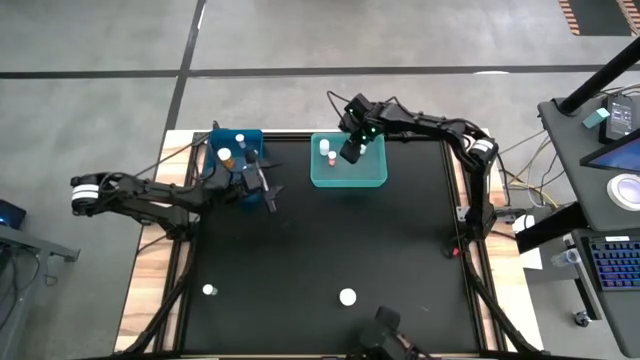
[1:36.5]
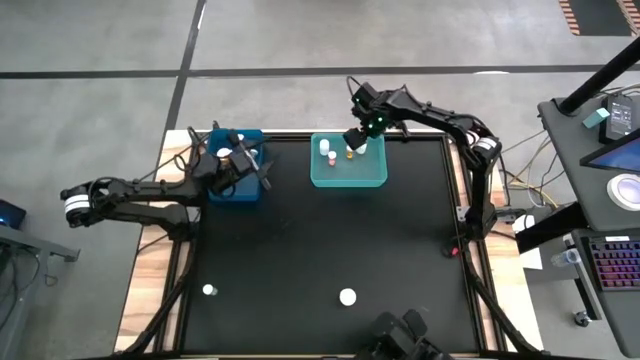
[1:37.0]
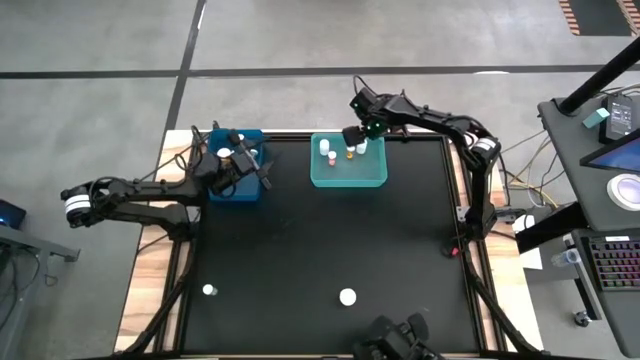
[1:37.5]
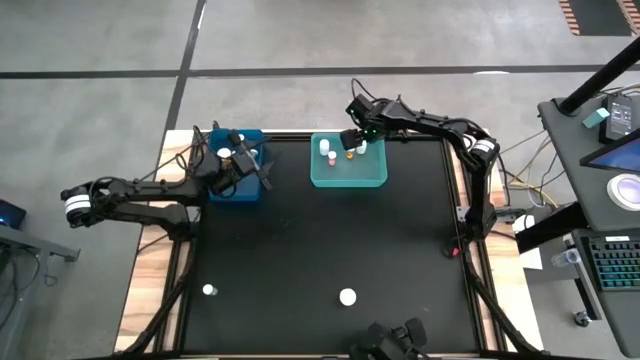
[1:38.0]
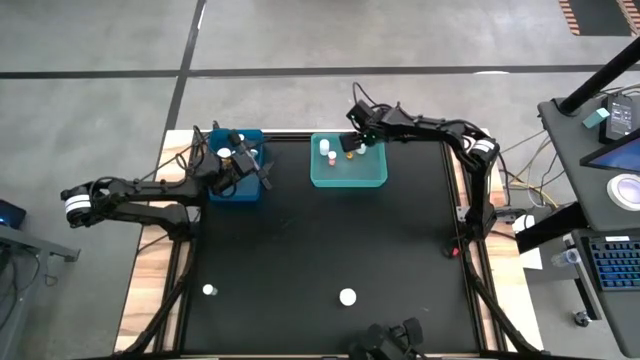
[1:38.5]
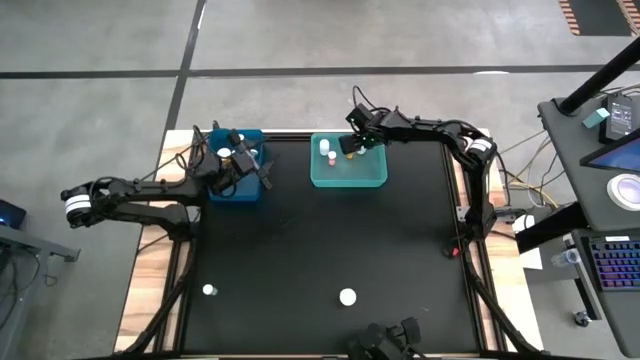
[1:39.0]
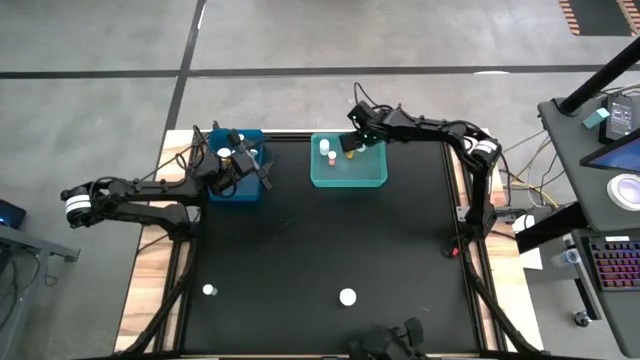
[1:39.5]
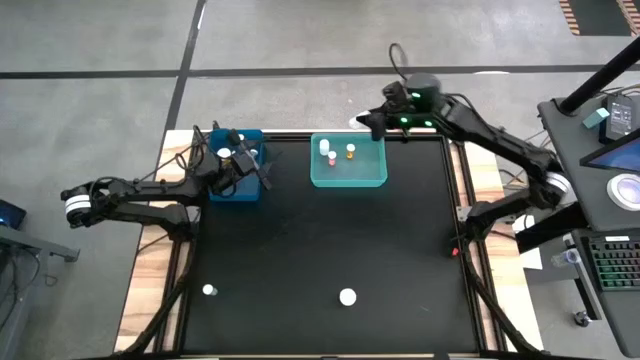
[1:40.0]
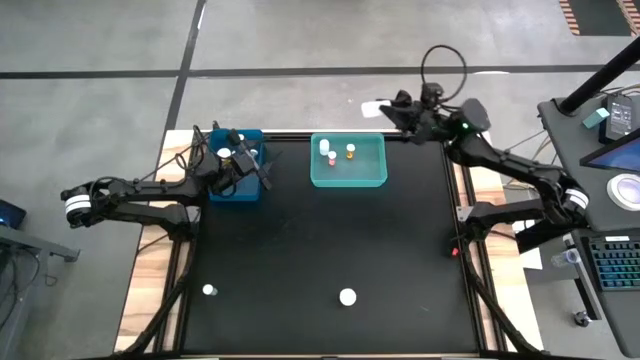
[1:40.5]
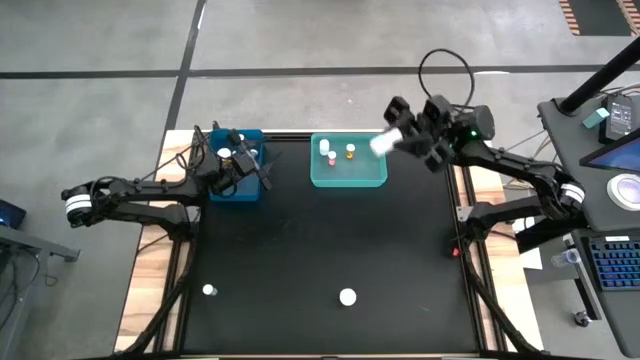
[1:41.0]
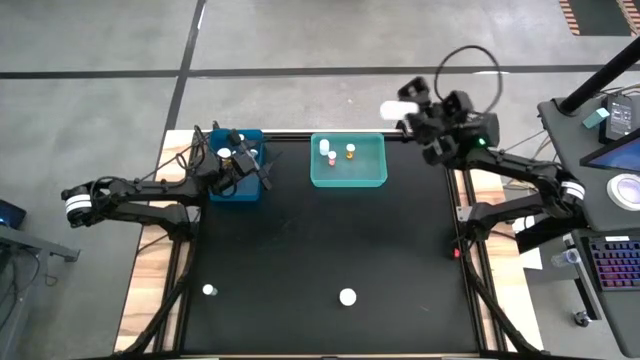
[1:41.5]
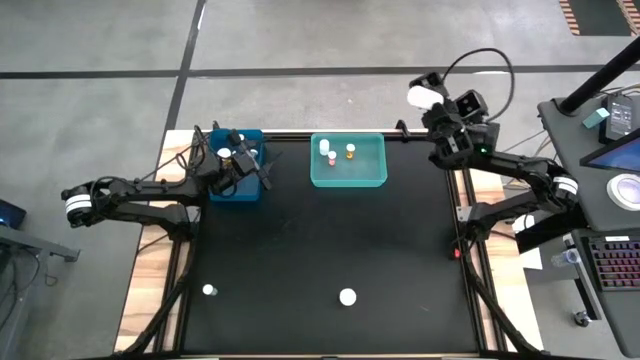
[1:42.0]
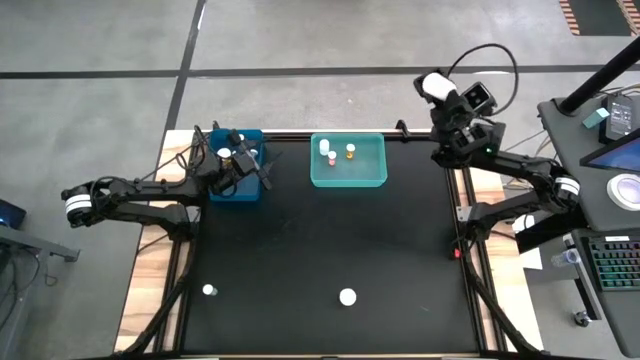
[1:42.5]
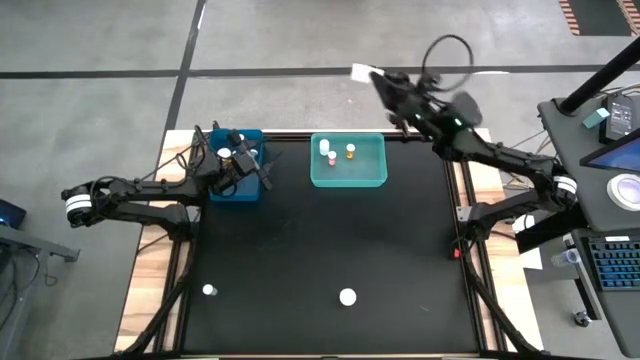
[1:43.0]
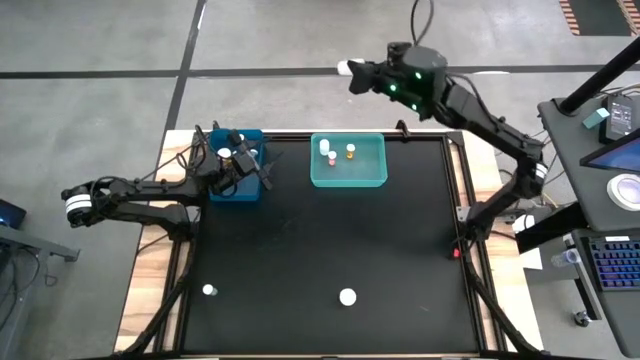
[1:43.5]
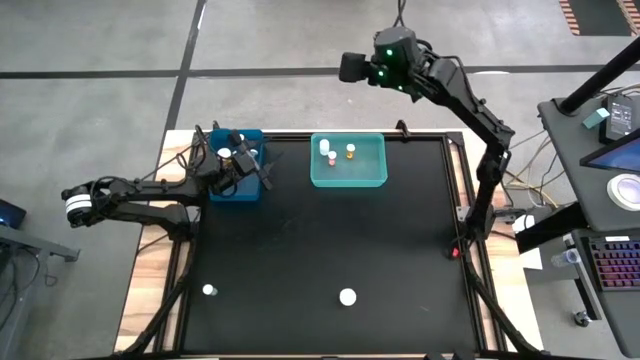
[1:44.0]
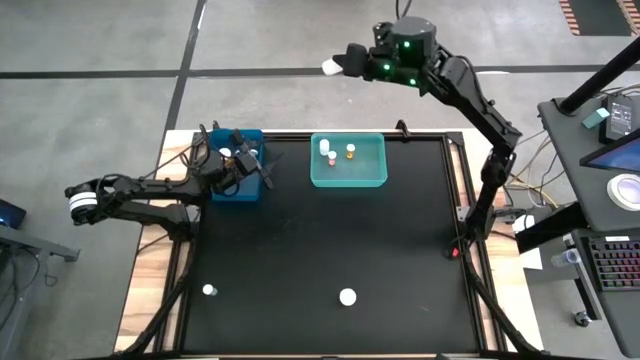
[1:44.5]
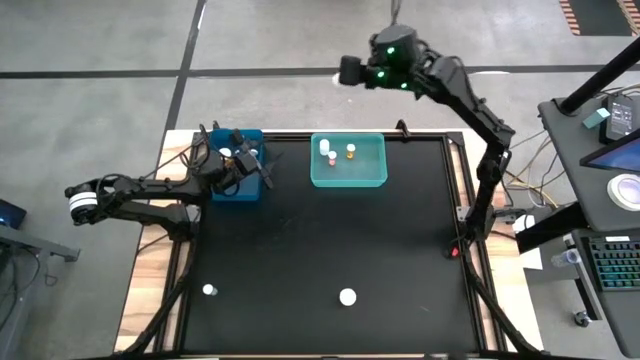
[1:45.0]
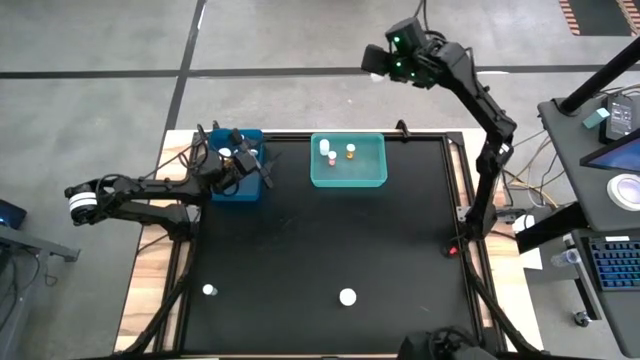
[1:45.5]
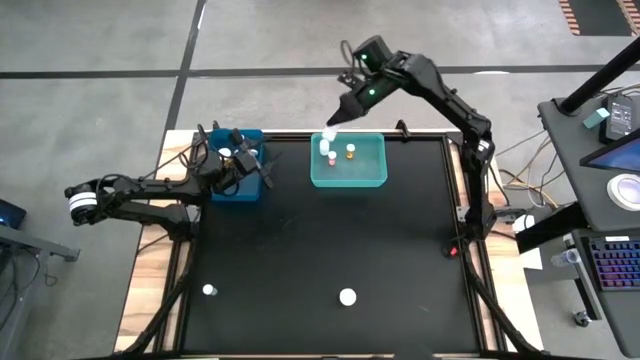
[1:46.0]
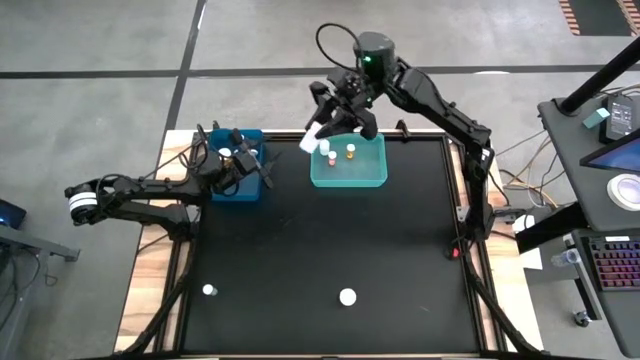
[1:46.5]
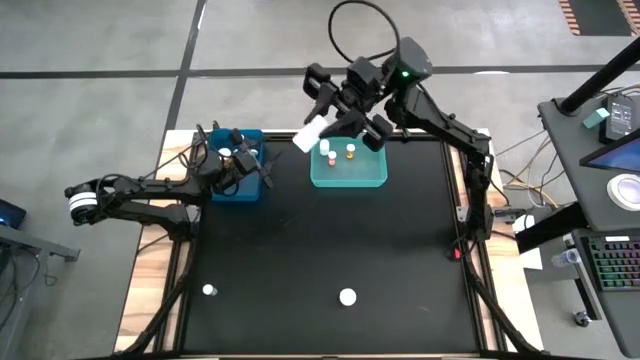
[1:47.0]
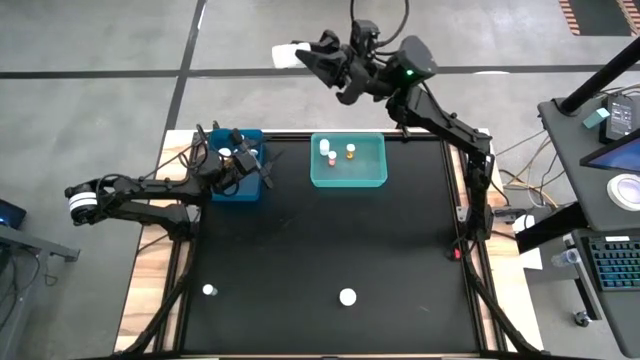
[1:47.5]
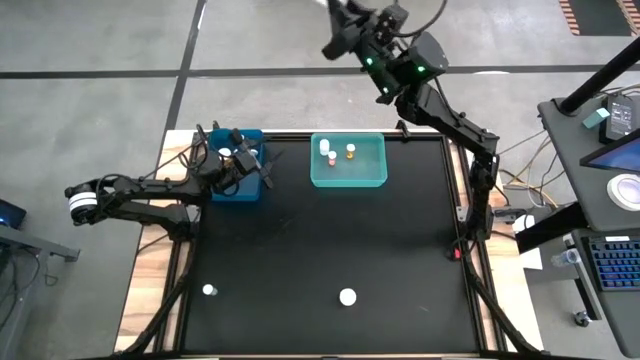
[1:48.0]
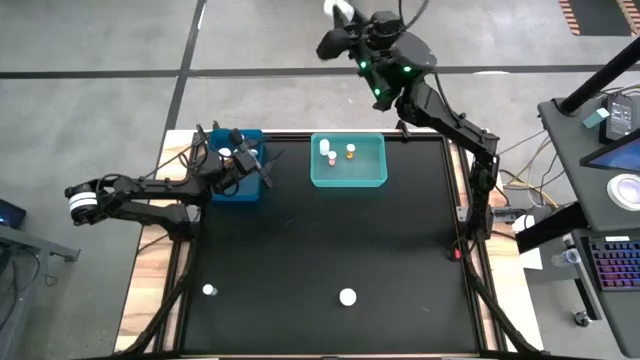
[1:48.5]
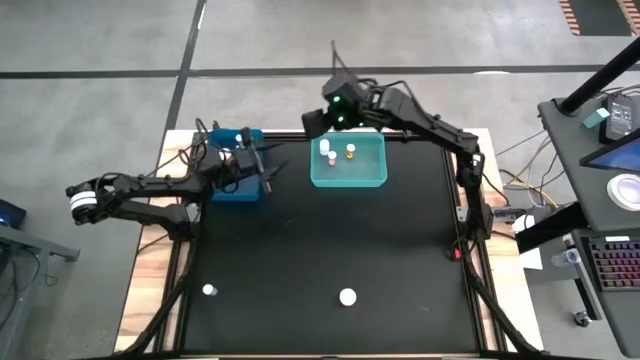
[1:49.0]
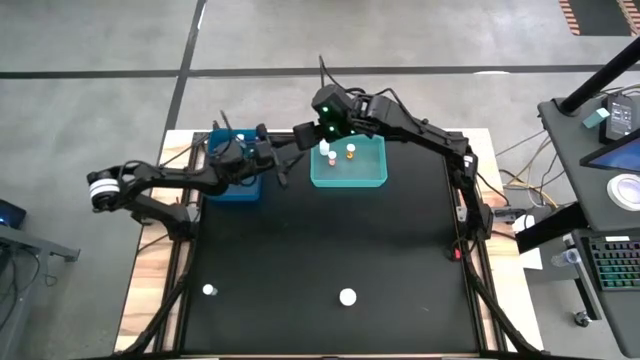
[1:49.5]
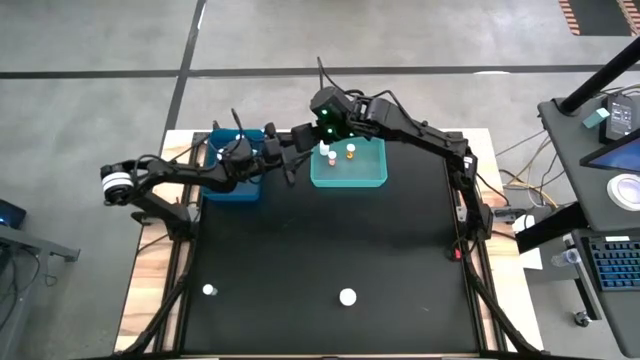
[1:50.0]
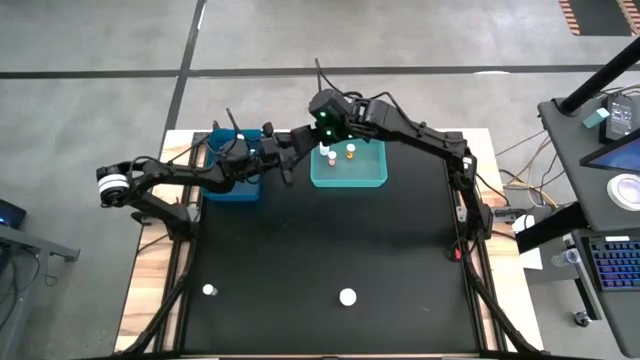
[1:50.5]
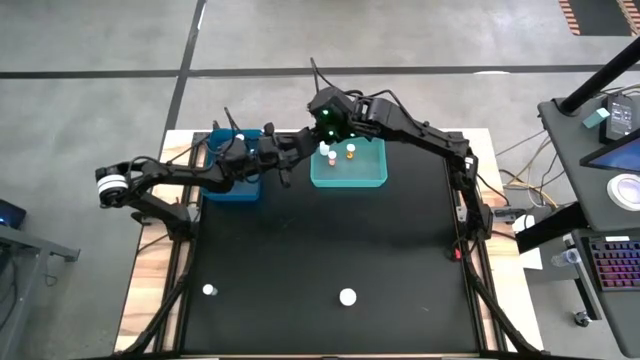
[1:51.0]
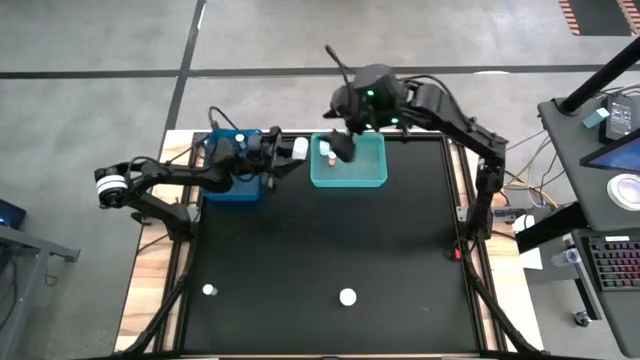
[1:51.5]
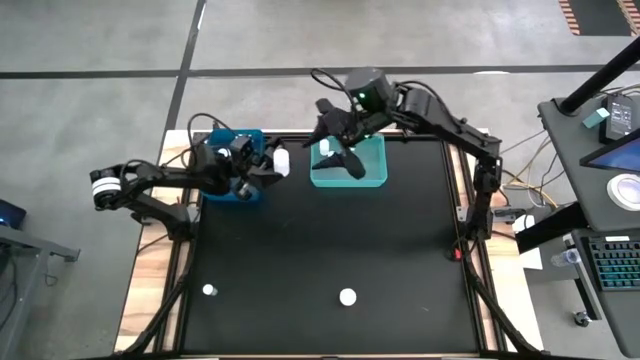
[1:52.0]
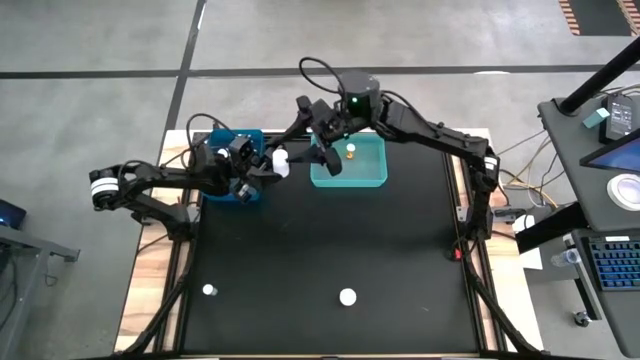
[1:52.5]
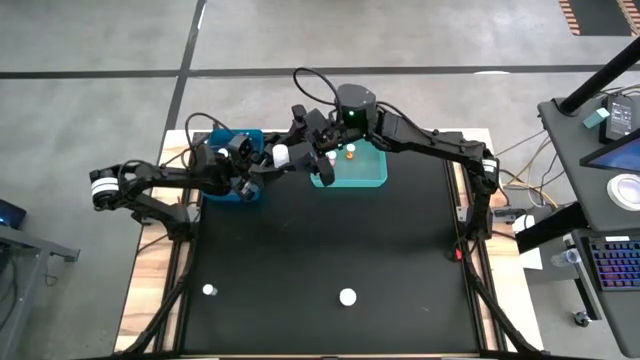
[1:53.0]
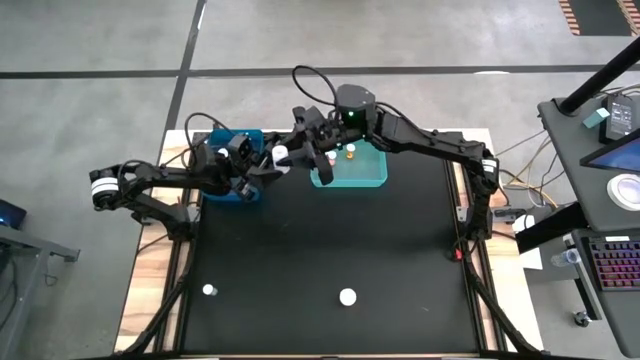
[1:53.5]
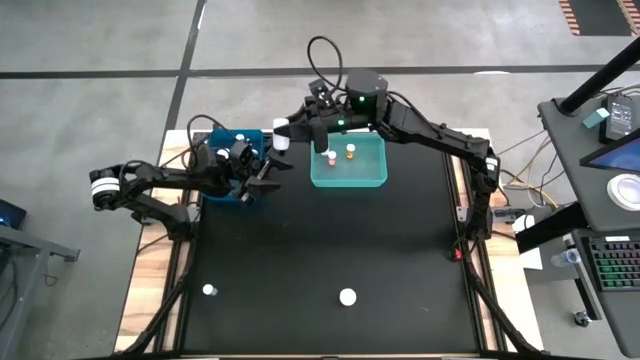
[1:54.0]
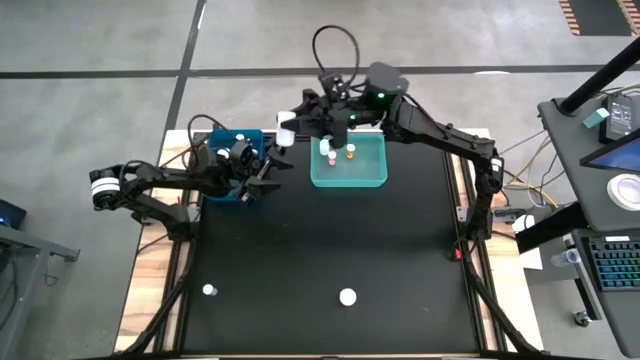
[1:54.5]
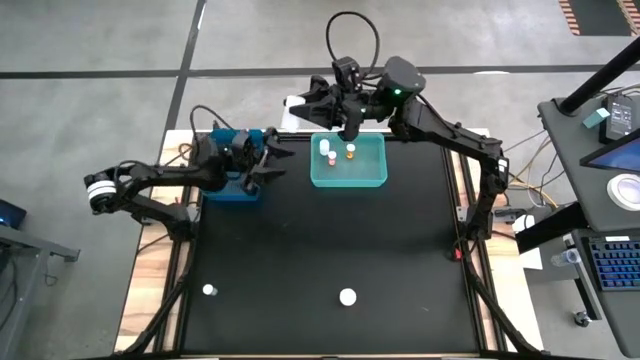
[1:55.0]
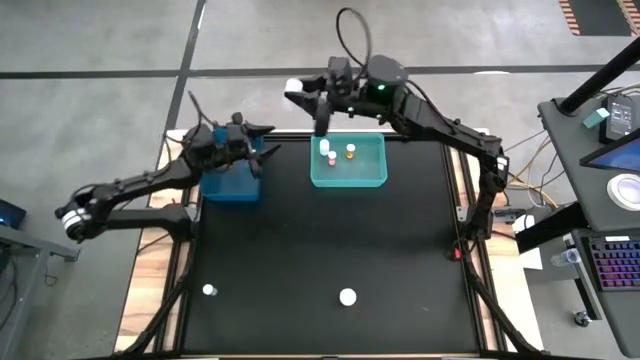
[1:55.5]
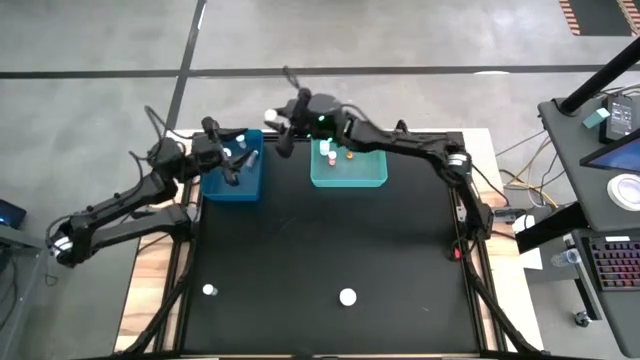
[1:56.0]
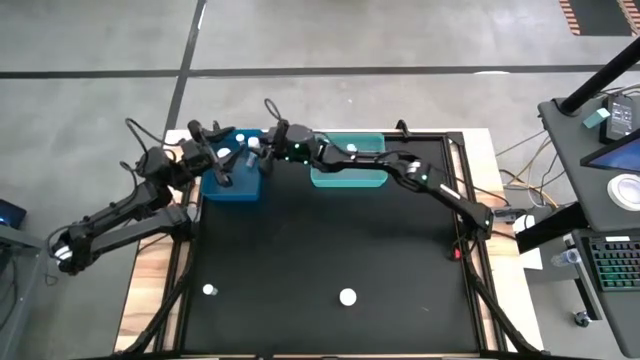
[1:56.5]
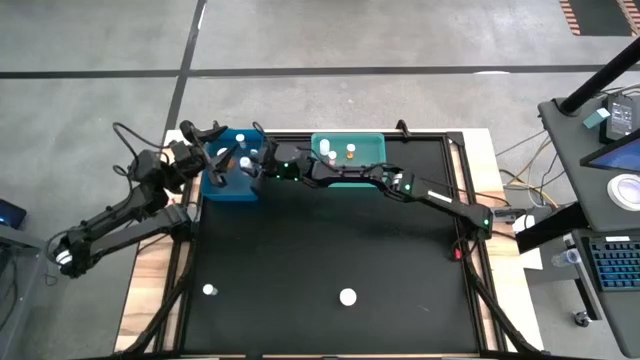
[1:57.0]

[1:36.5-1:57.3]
Task: Pick and place medicine bottles into bin by pill shape (circle, oval)
Put the white capsule bottle into the blue bin
